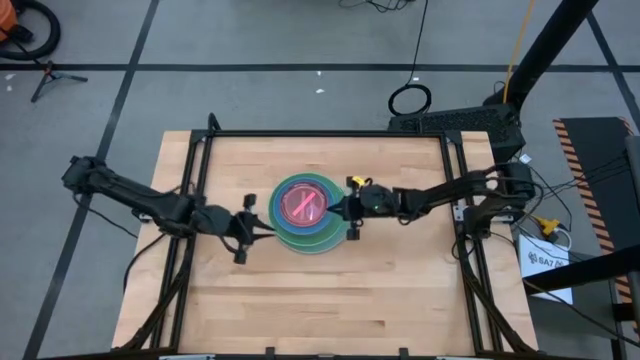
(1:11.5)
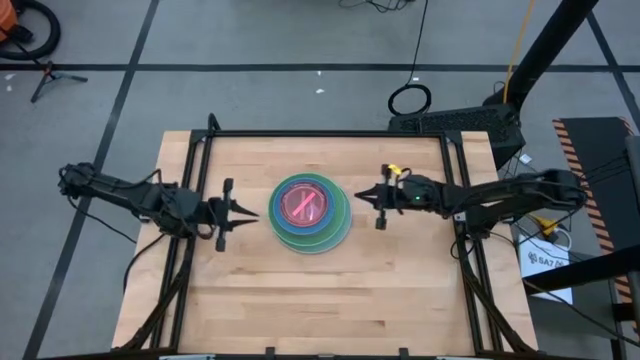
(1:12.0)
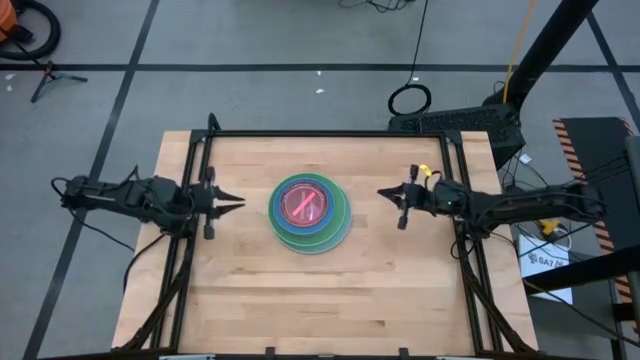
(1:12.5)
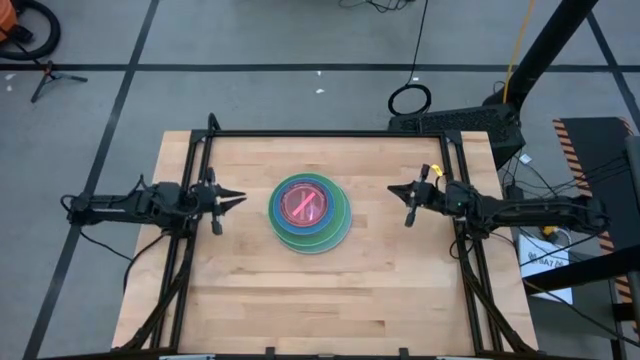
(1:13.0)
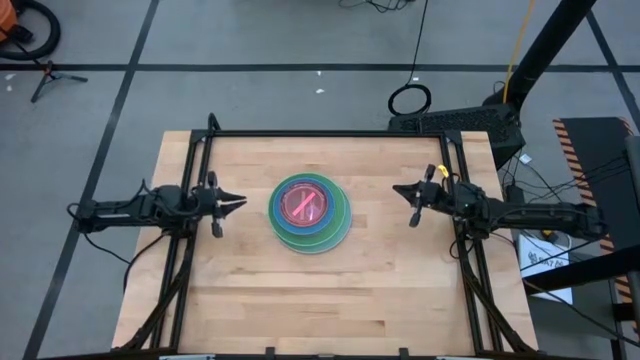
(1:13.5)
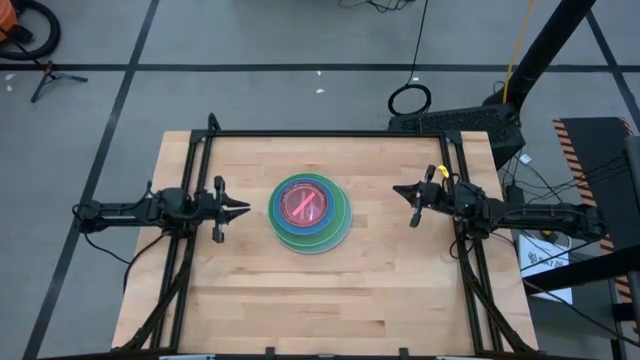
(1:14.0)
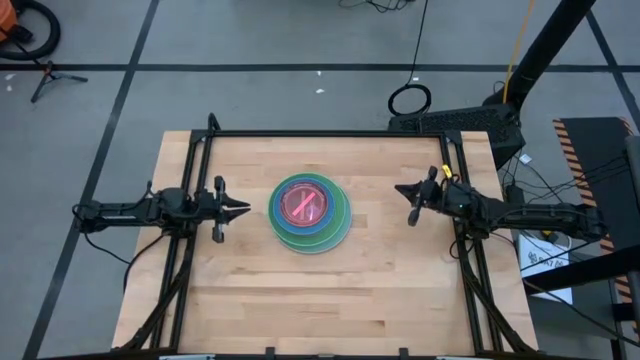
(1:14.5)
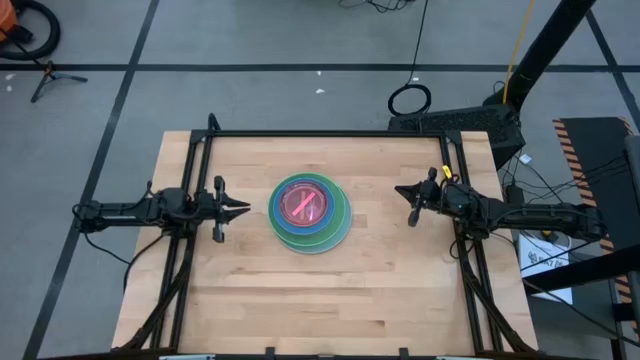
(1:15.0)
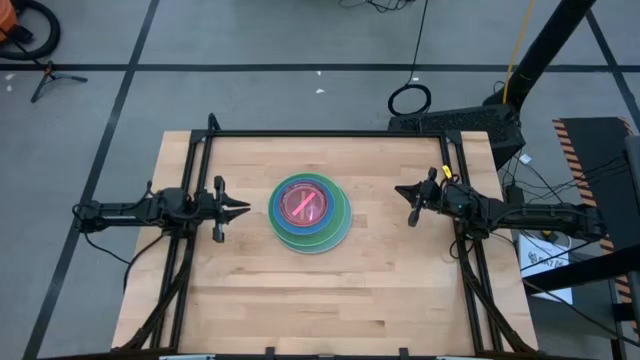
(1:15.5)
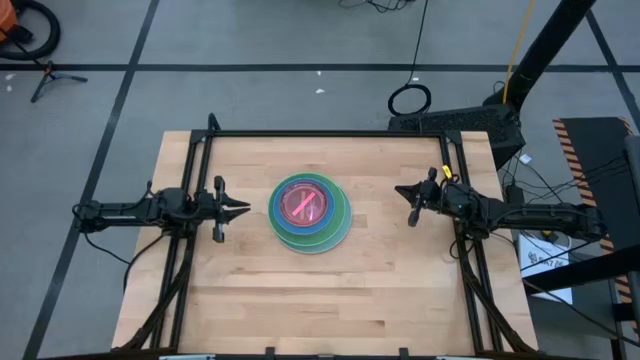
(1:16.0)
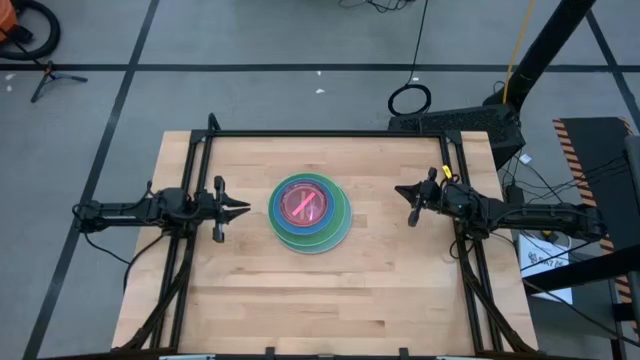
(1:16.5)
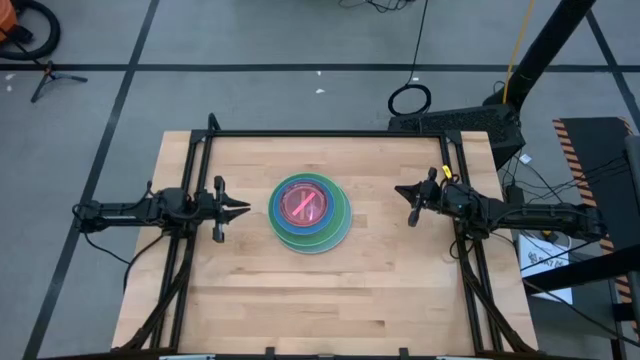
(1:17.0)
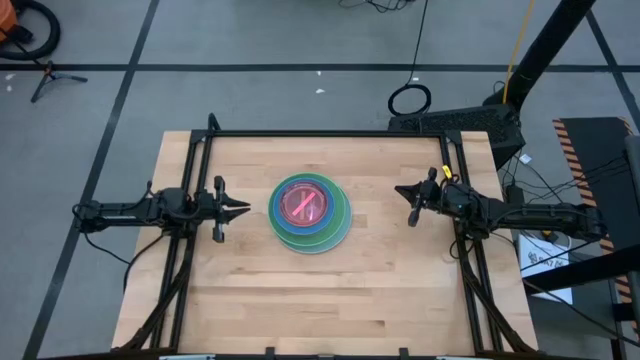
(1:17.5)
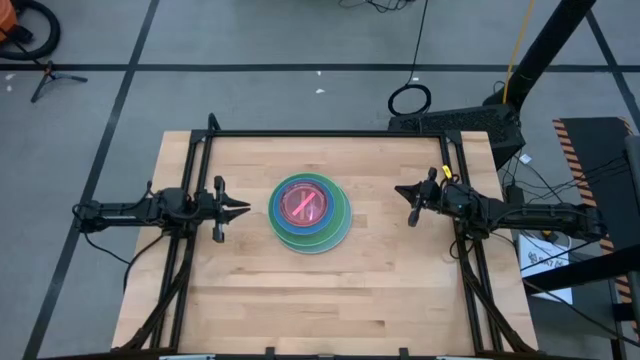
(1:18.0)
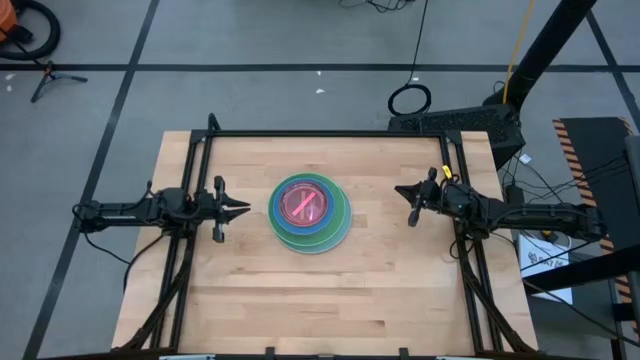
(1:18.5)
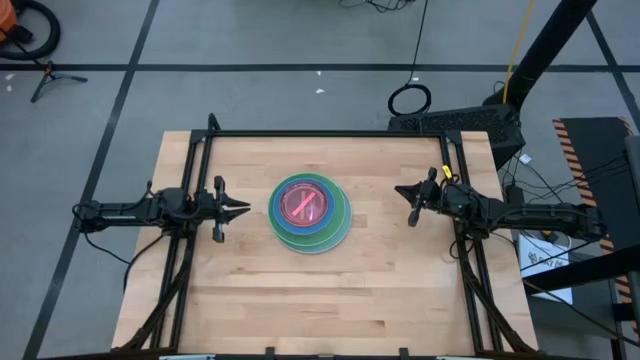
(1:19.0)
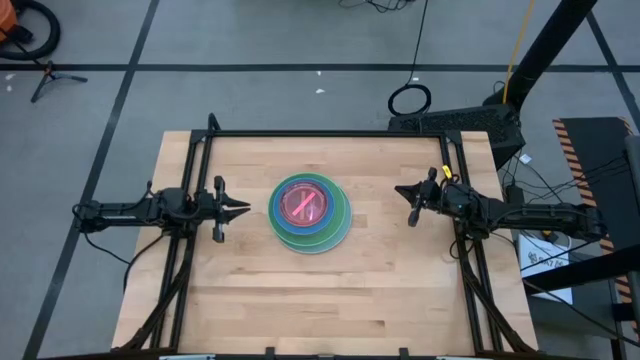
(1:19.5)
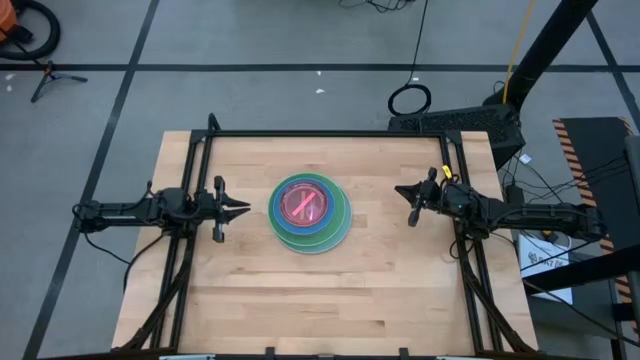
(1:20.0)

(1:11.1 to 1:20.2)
Task: Stack plastic plates
Return to Home Position

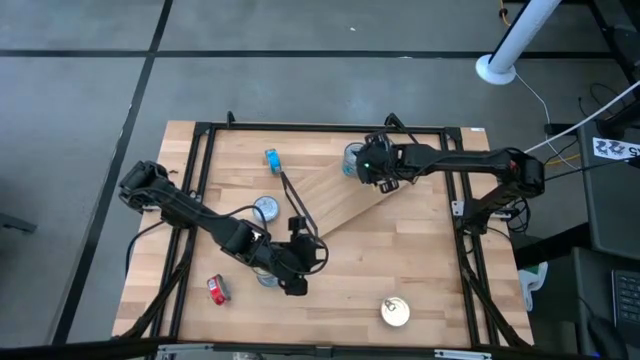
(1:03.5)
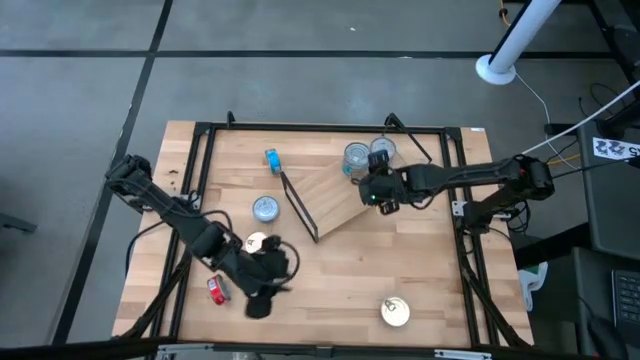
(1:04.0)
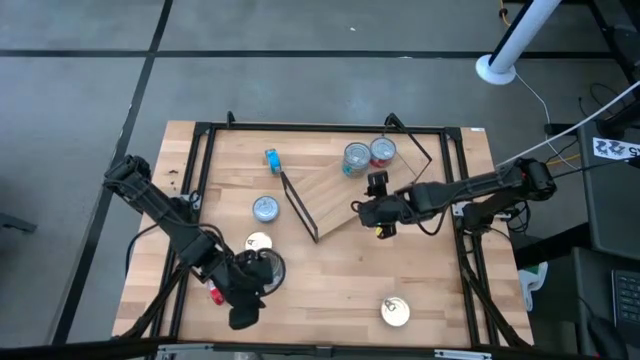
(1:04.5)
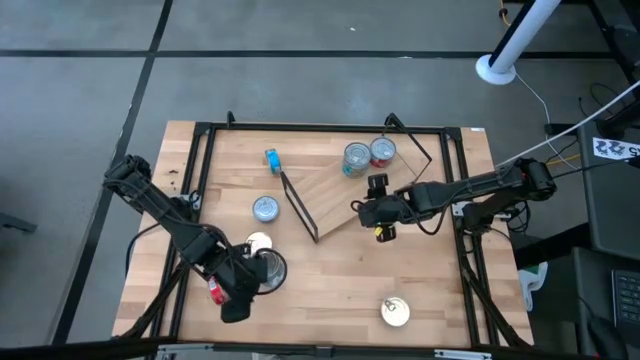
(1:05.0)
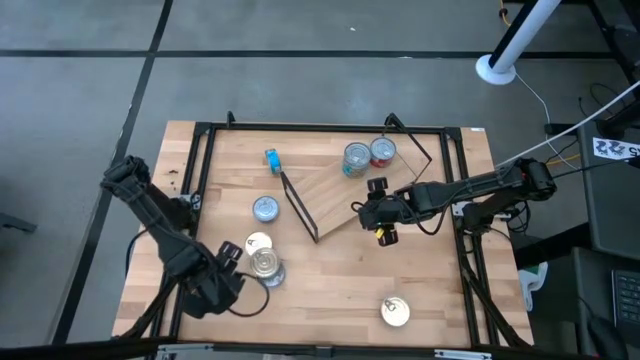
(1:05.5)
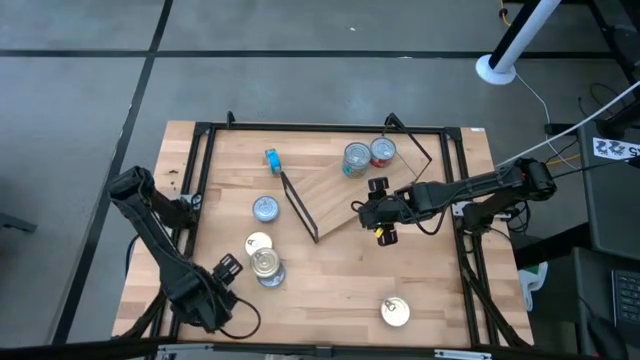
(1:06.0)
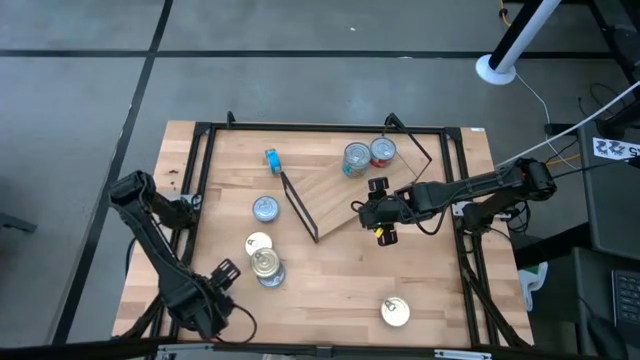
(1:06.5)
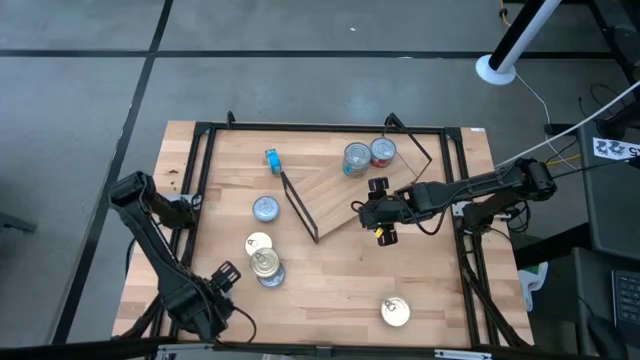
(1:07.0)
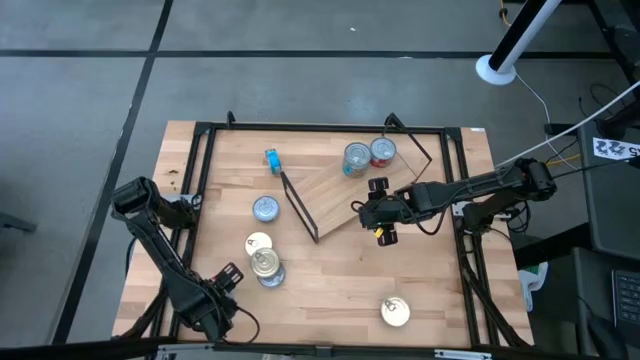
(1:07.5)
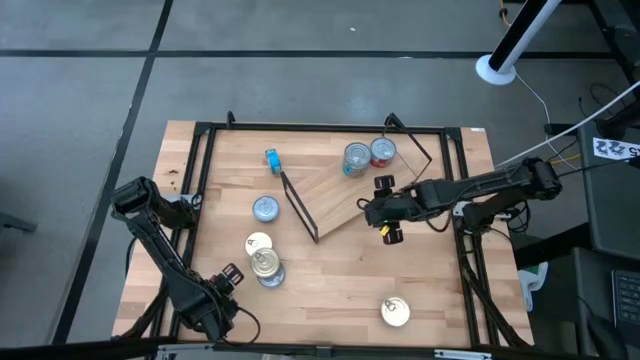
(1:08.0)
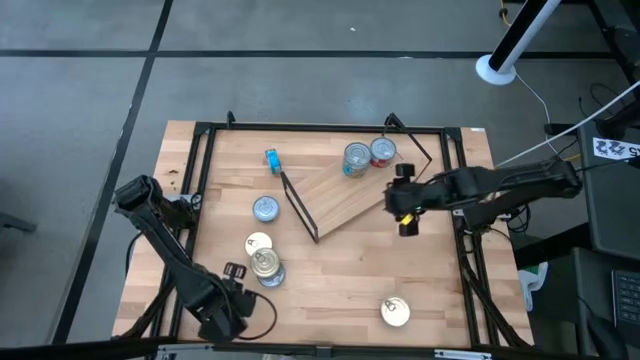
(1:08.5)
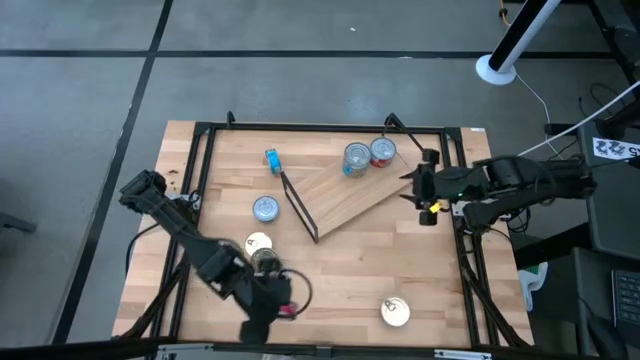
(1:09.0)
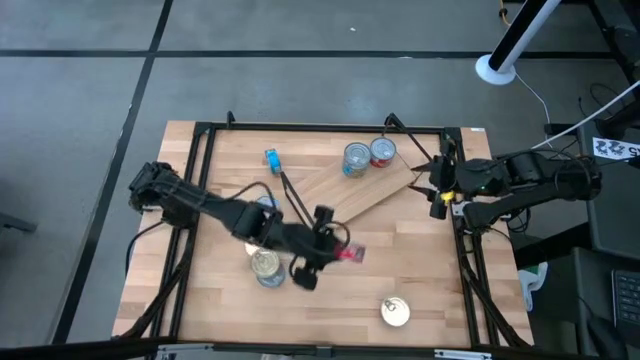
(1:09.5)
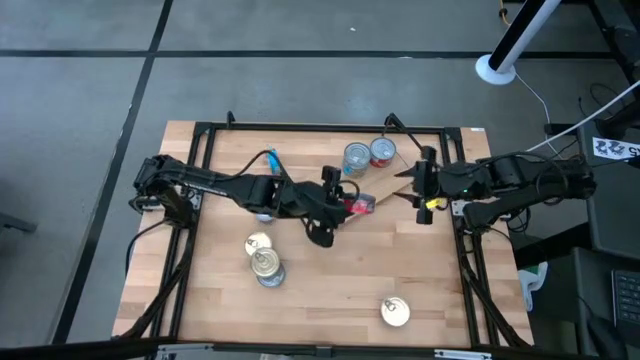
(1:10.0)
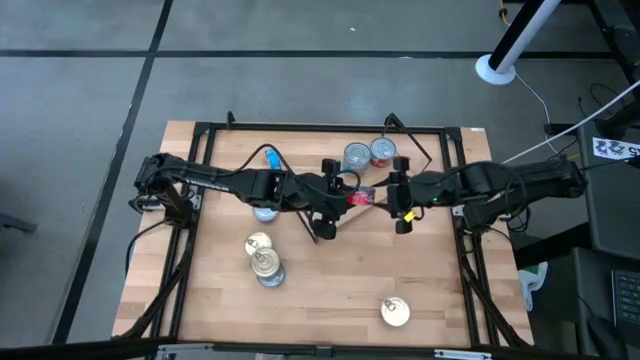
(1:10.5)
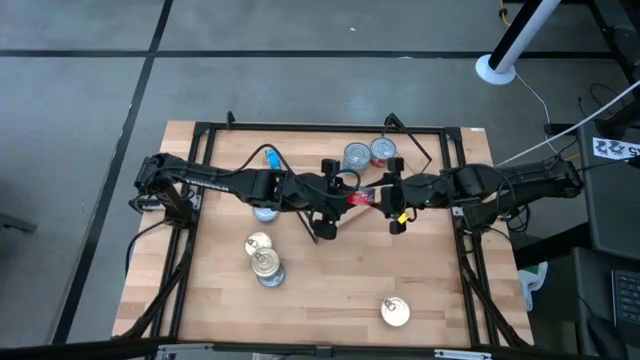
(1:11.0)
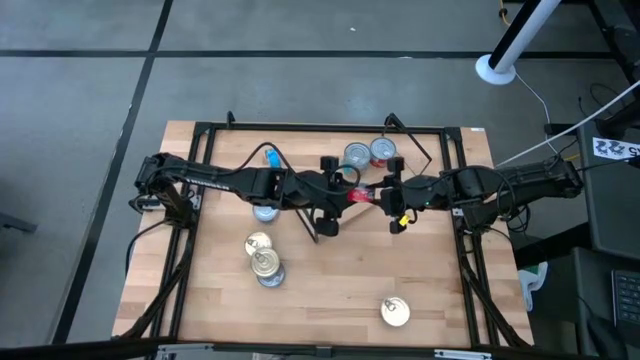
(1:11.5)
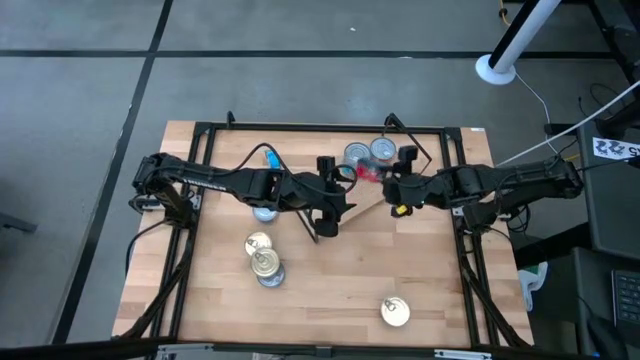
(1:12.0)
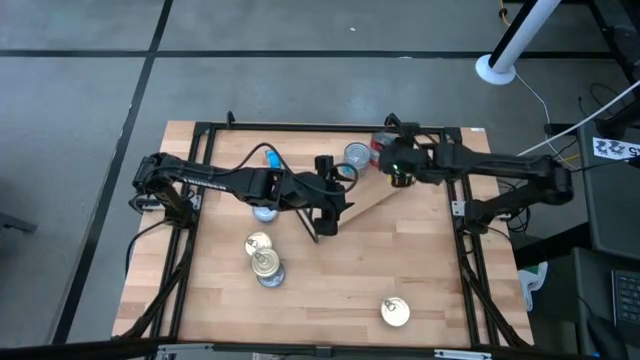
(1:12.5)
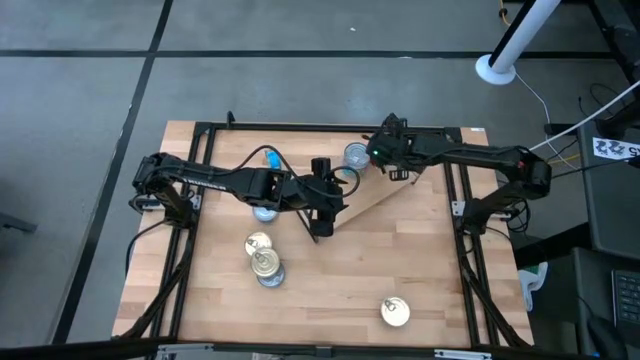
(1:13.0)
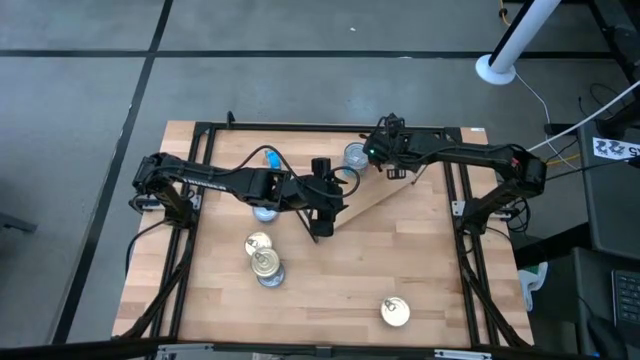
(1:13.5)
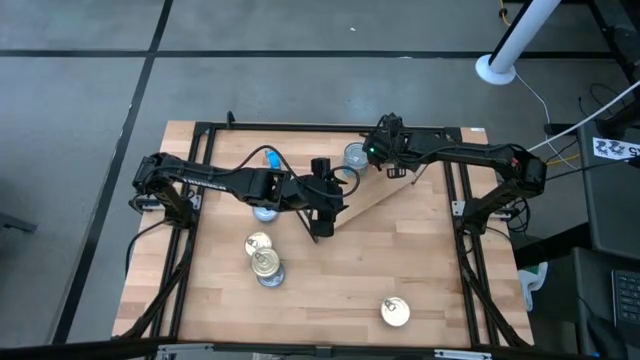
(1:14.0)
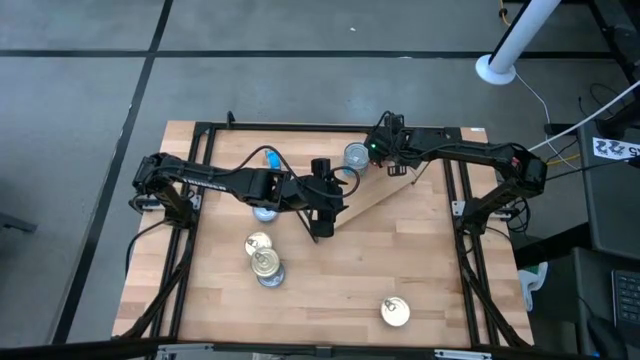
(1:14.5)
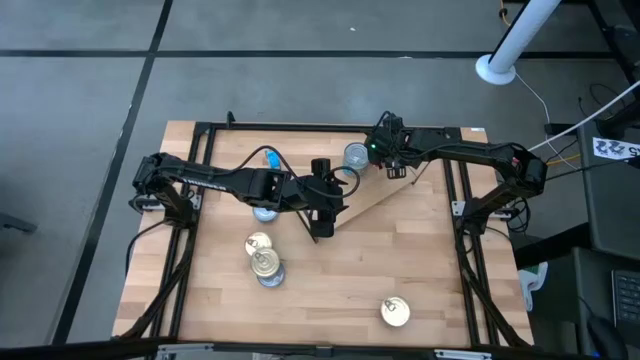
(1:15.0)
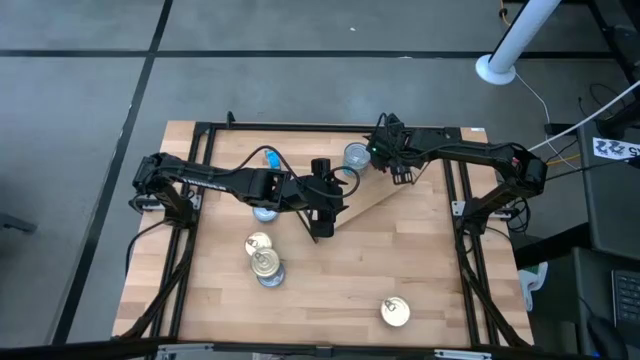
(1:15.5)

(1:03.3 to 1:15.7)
Task: Stack canned seafood by type on shelf
Stack the red tuna can on top of the red tuna can on the shelf
